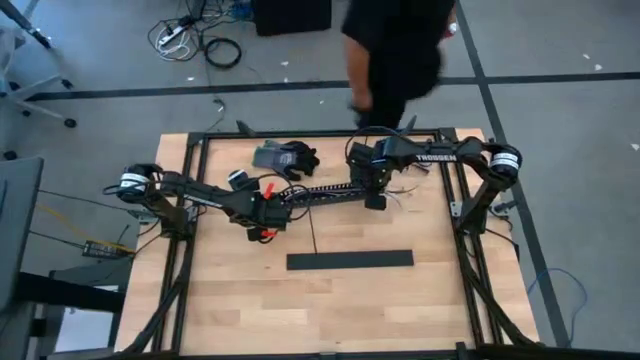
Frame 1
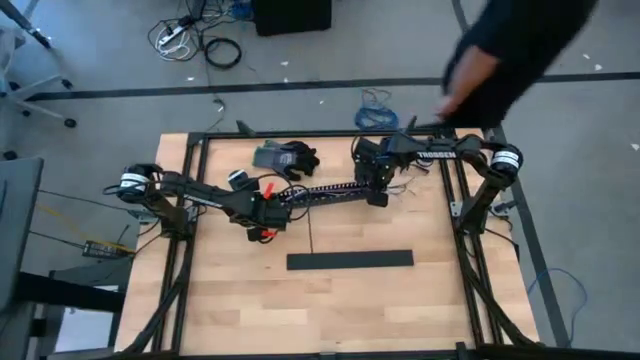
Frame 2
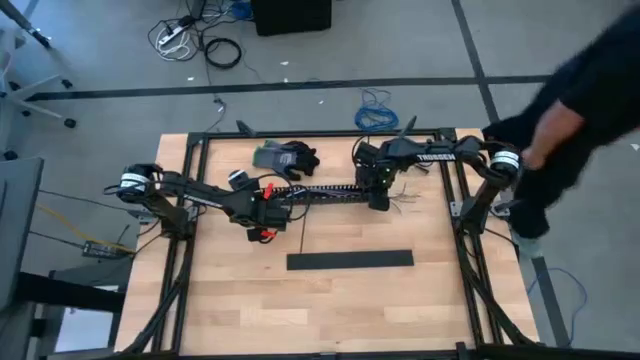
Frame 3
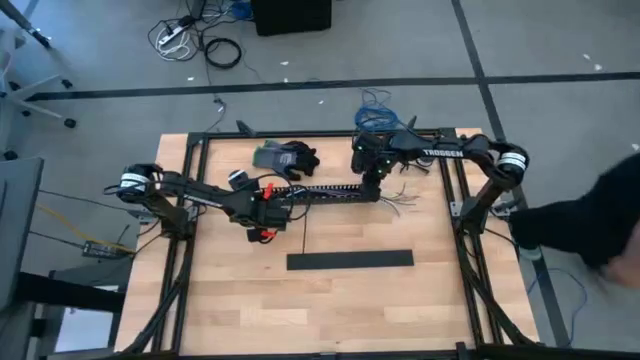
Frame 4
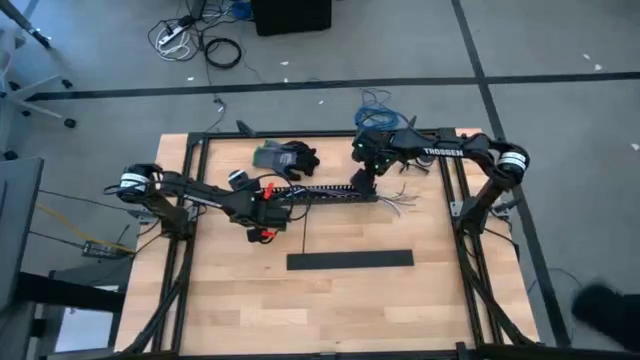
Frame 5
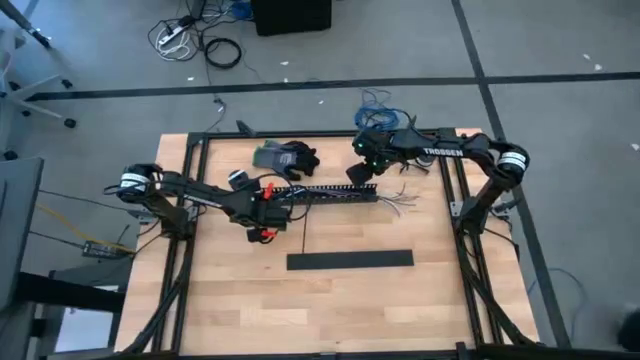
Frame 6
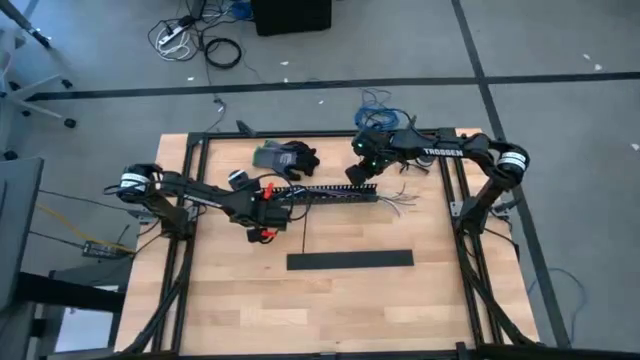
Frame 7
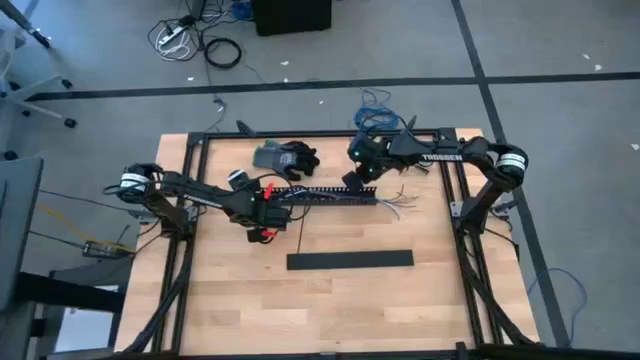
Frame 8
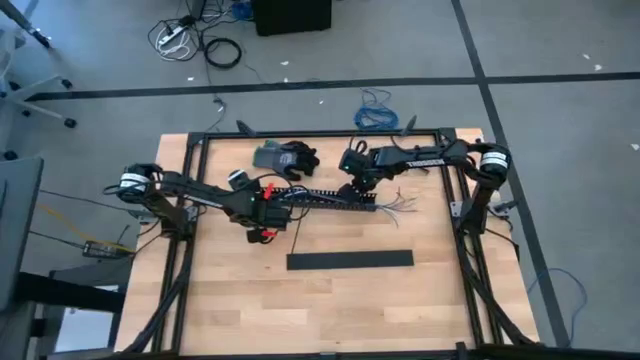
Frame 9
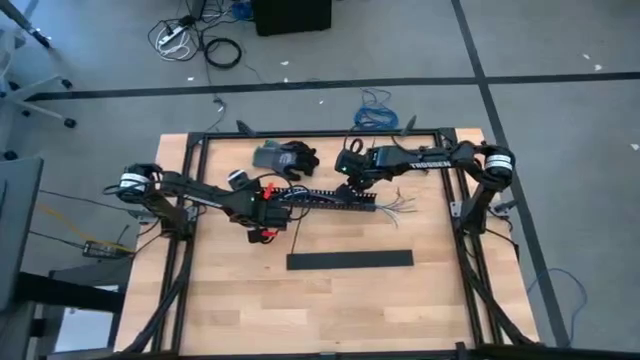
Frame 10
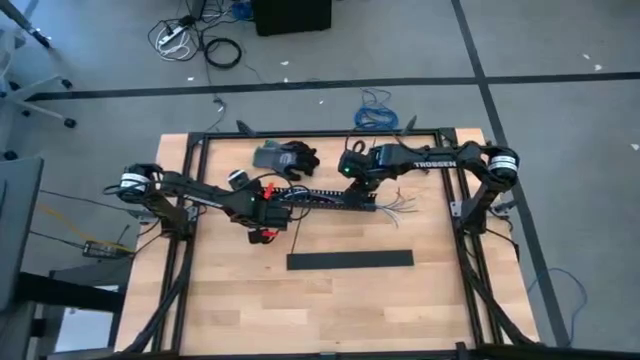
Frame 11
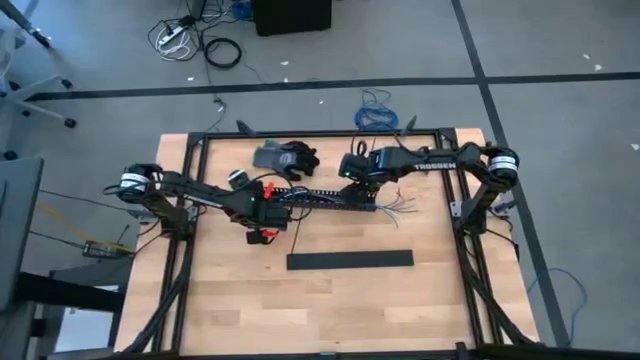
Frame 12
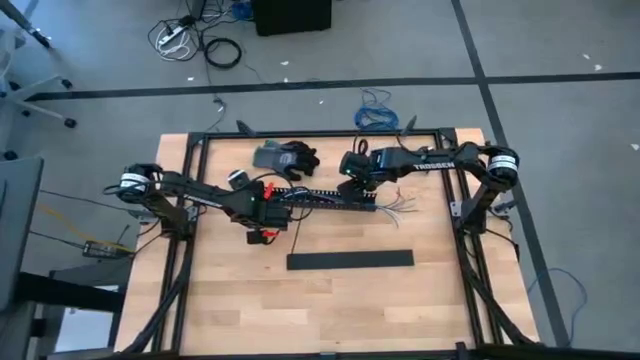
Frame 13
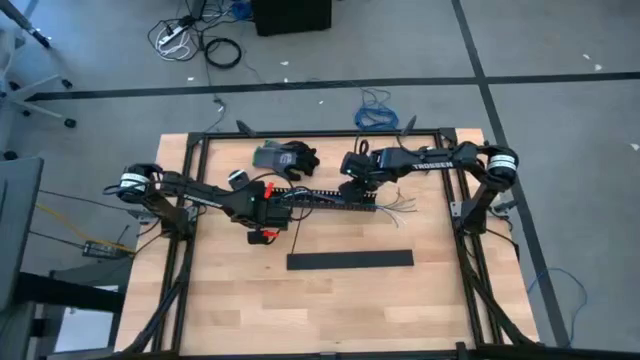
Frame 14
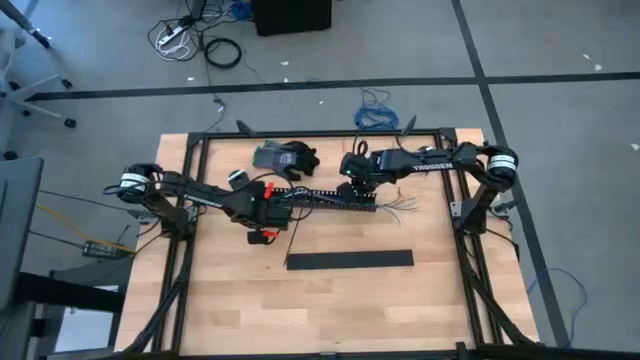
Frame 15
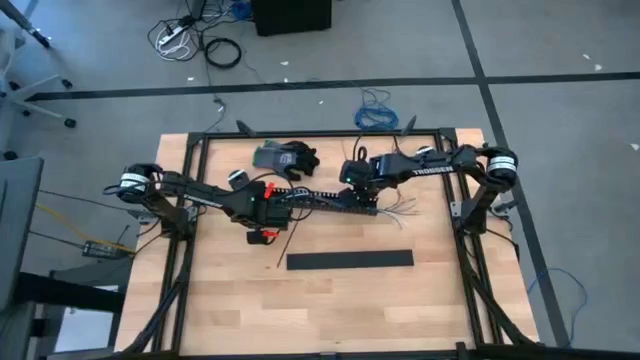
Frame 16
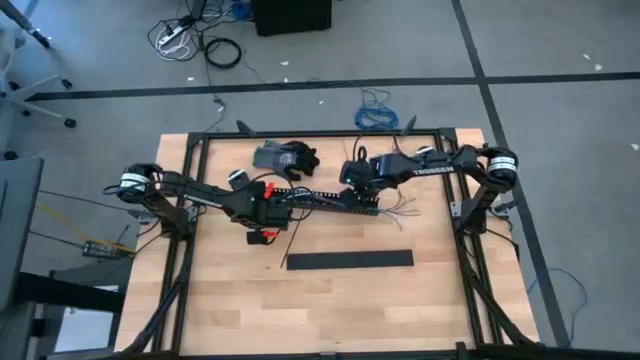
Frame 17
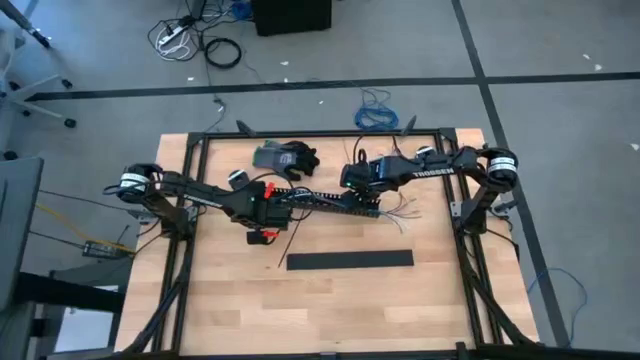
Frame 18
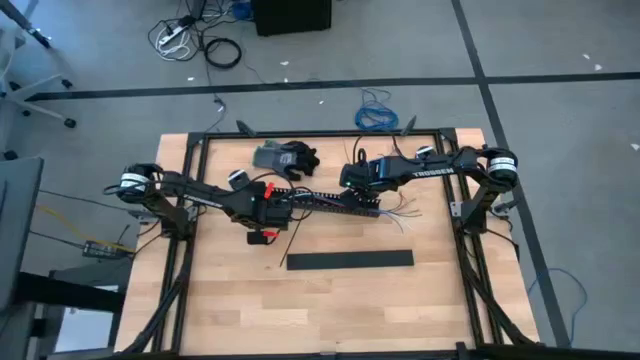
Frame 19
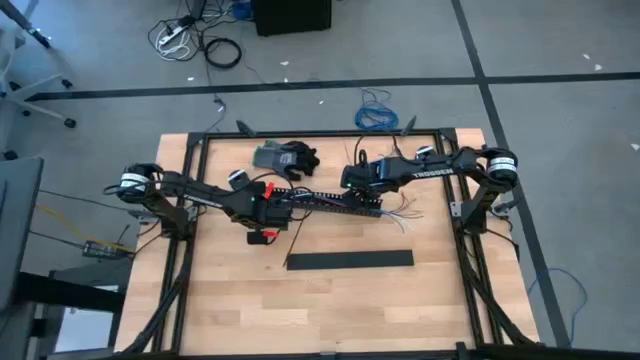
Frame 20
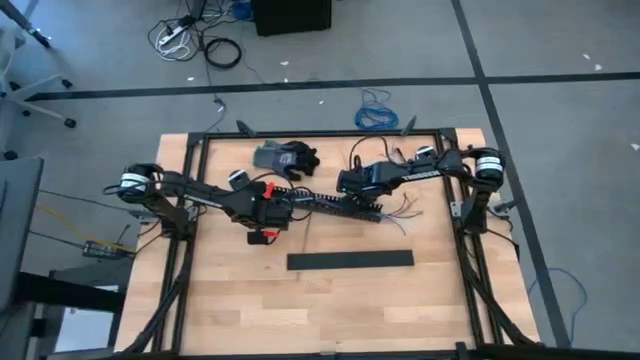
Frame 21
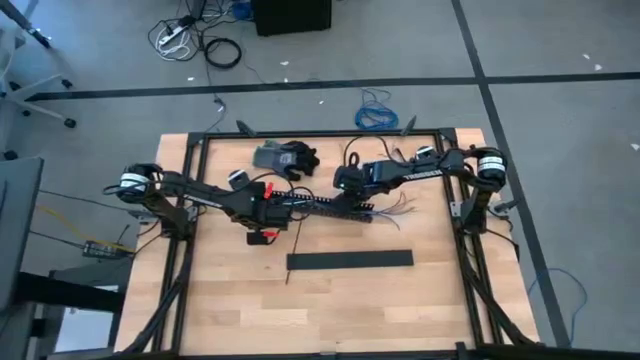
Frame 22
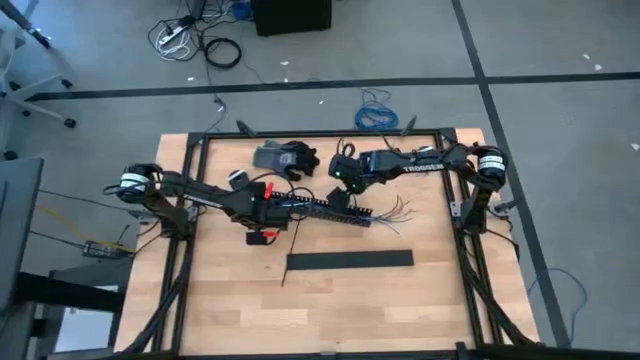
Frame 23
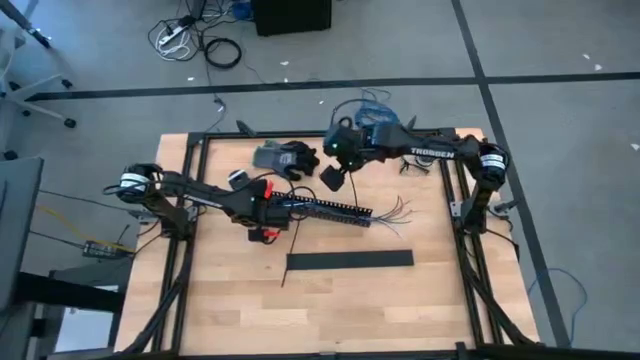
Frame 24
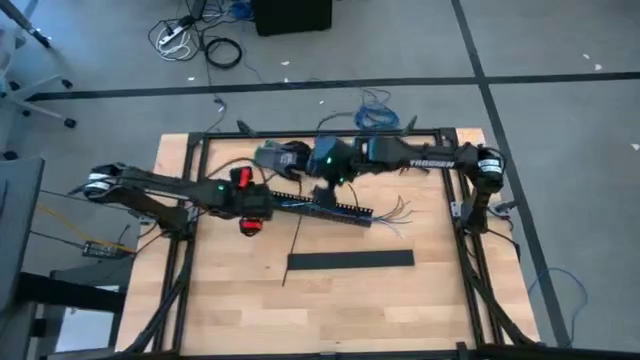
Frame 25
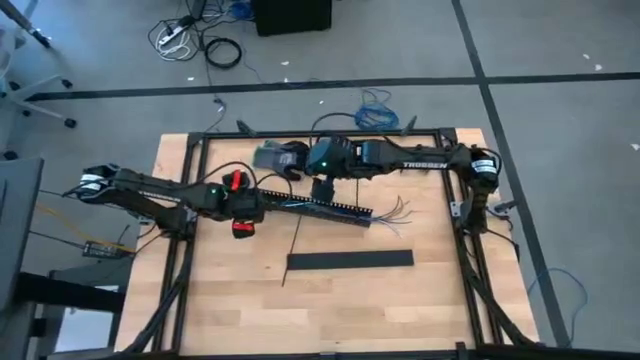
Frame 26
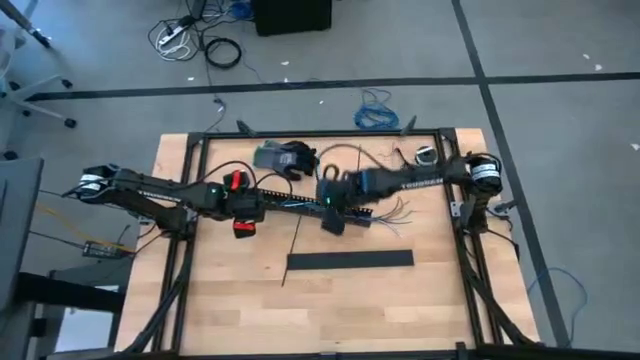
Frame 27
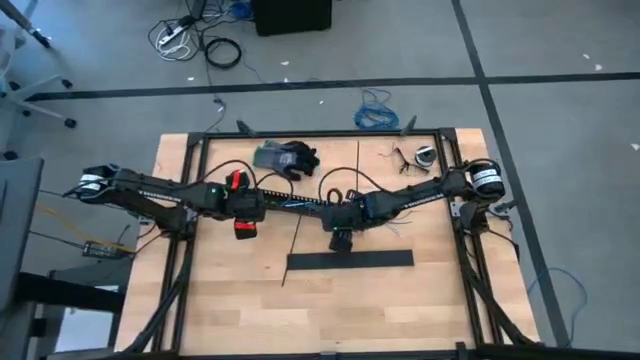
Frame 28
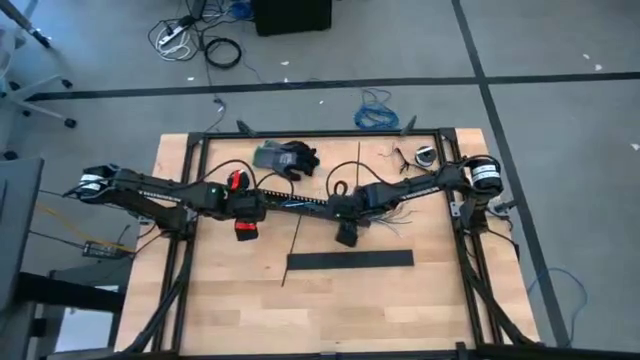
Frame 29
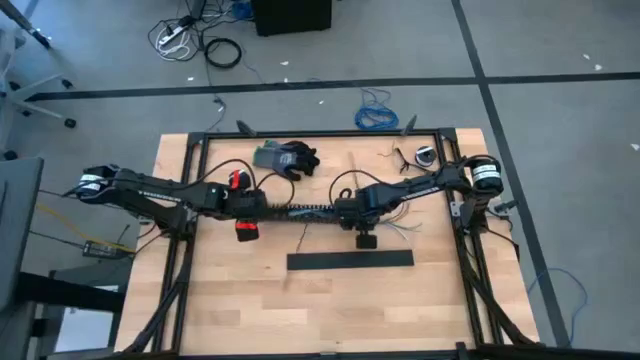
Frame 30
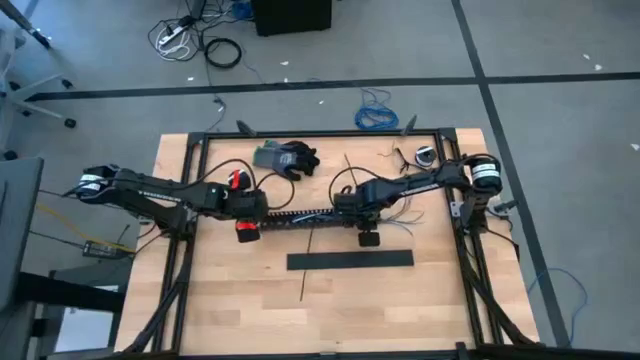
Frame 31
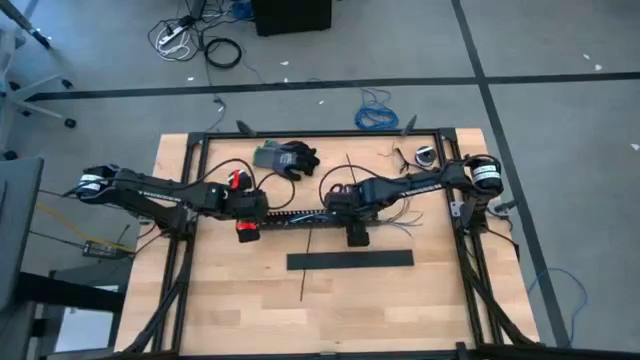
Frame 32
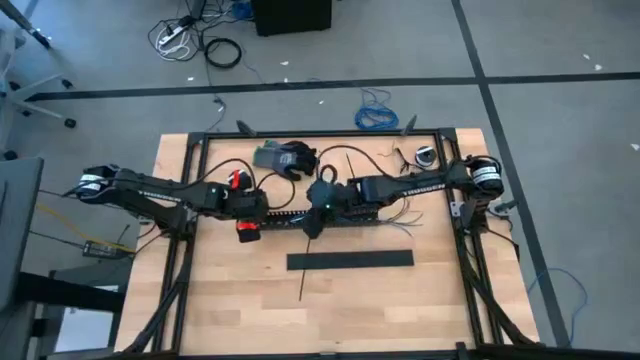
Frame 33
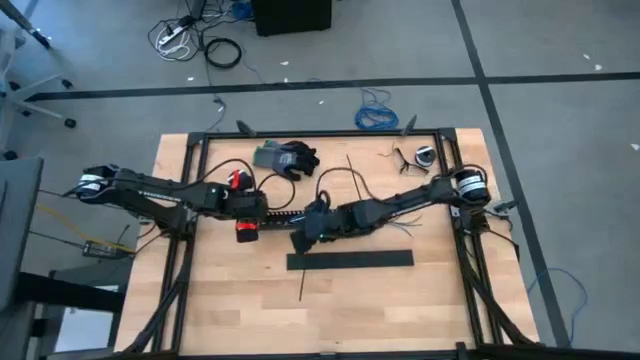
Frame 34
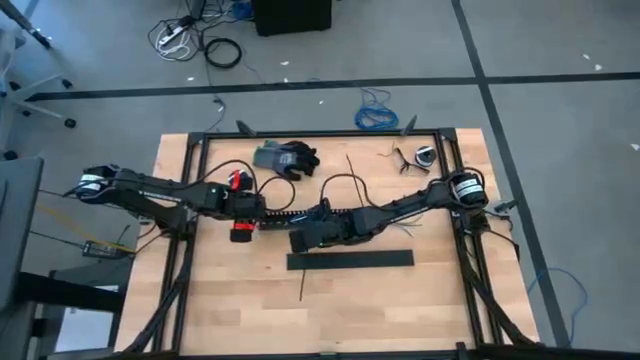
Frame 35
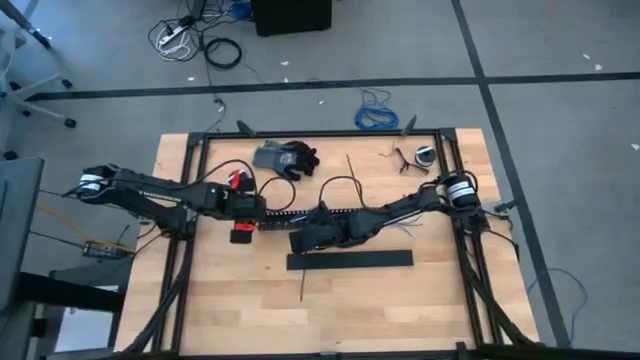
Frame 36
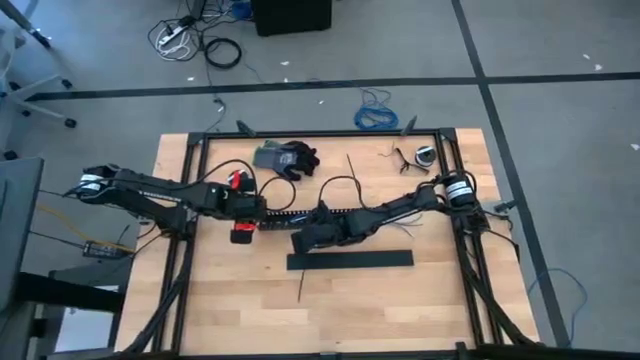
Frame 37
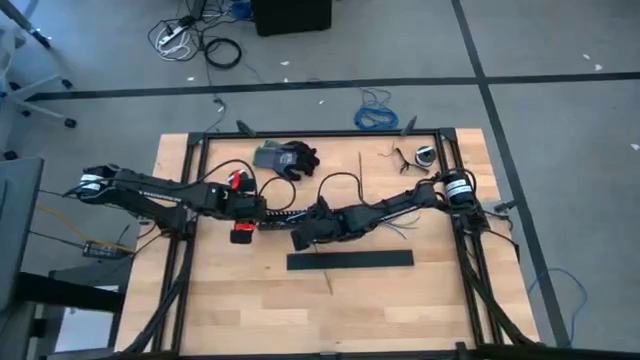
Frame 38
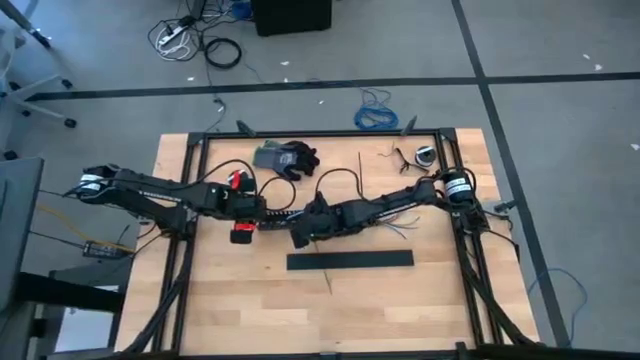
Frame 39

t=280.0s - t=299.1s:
Task: Ziptie cables
Put the ziptied wire cables into the black cable duct
